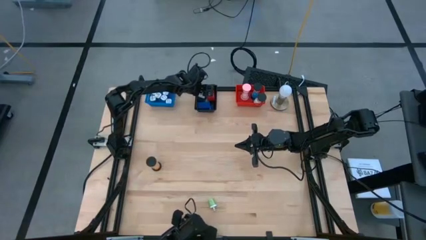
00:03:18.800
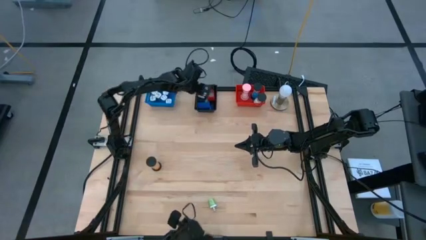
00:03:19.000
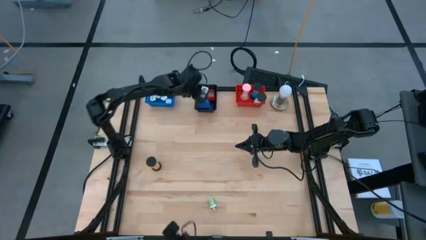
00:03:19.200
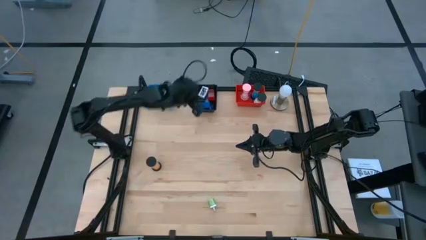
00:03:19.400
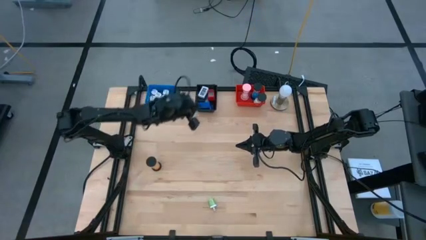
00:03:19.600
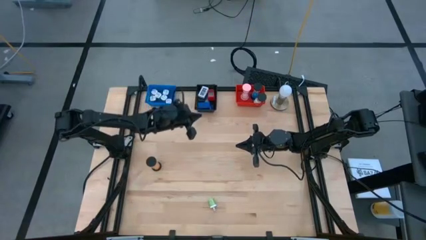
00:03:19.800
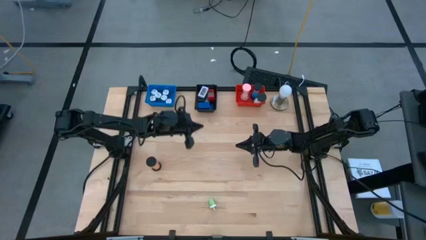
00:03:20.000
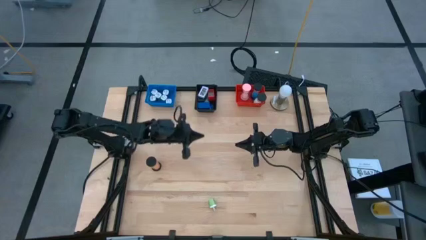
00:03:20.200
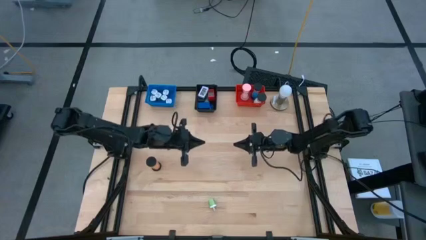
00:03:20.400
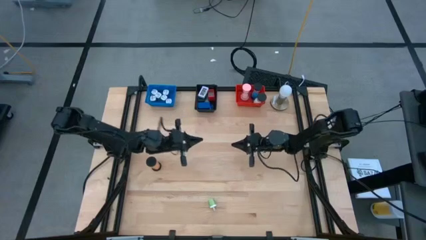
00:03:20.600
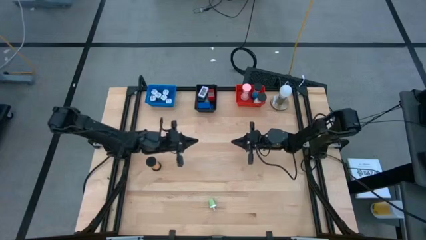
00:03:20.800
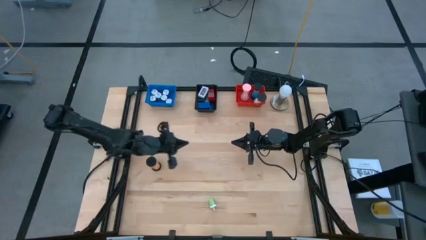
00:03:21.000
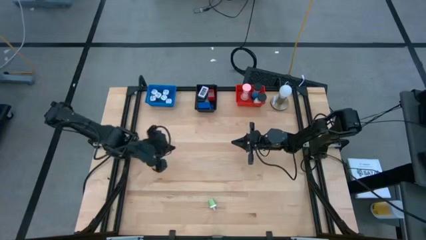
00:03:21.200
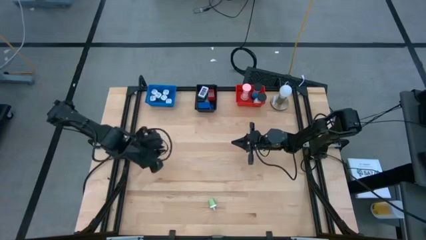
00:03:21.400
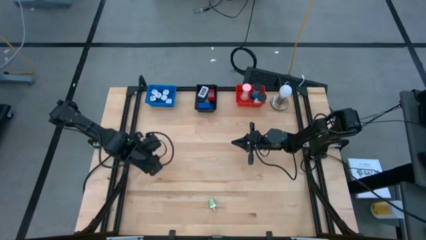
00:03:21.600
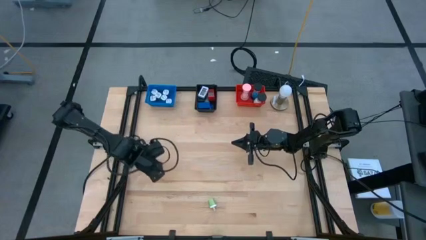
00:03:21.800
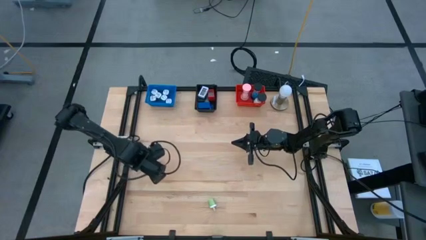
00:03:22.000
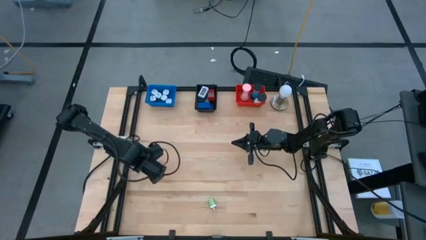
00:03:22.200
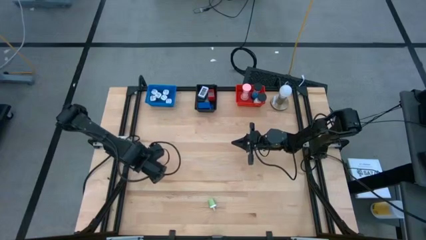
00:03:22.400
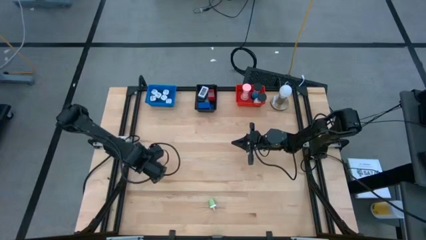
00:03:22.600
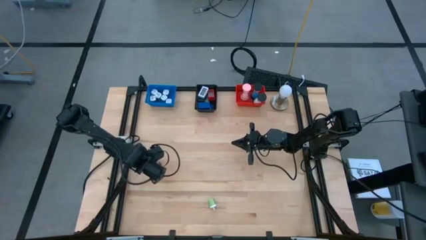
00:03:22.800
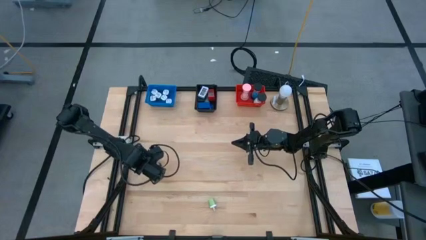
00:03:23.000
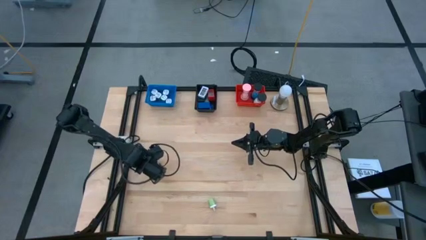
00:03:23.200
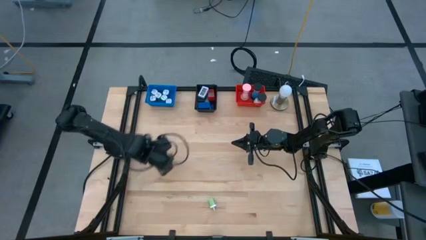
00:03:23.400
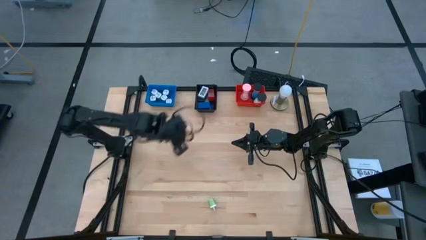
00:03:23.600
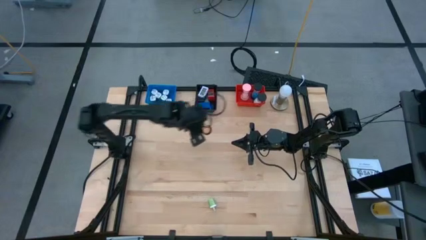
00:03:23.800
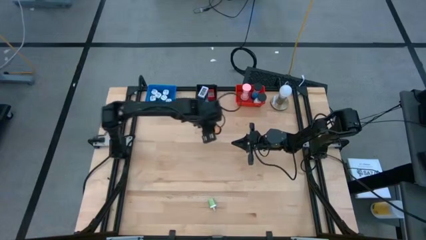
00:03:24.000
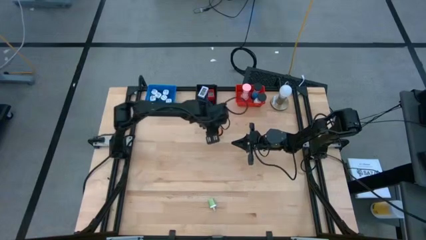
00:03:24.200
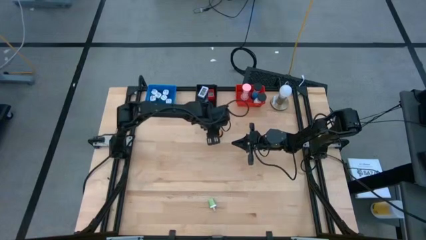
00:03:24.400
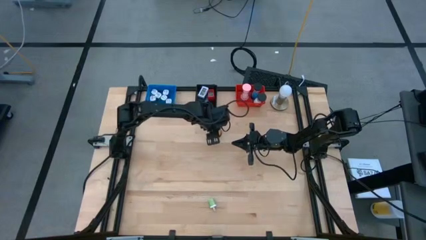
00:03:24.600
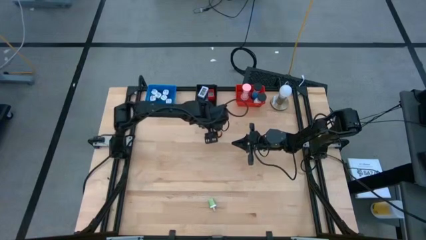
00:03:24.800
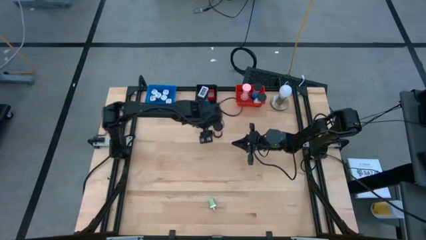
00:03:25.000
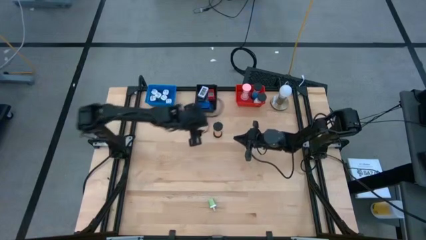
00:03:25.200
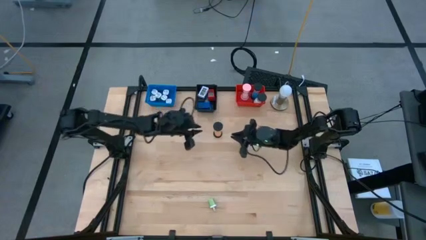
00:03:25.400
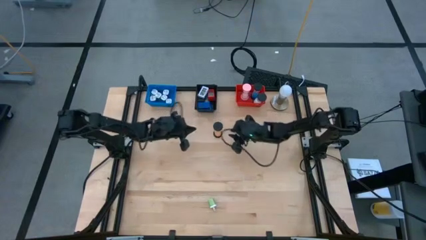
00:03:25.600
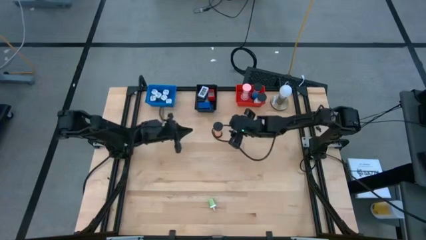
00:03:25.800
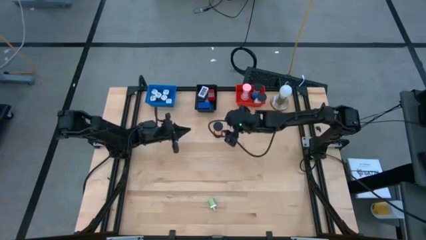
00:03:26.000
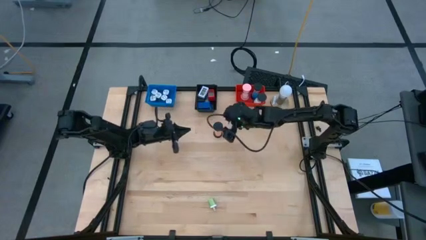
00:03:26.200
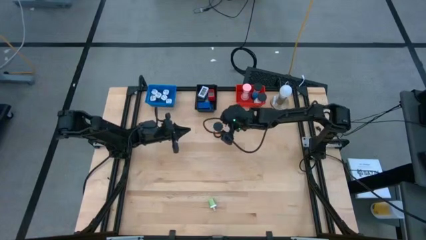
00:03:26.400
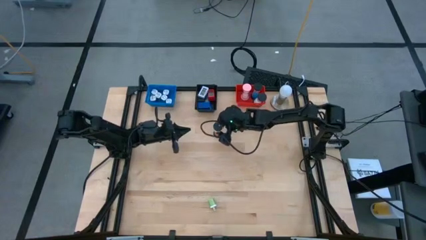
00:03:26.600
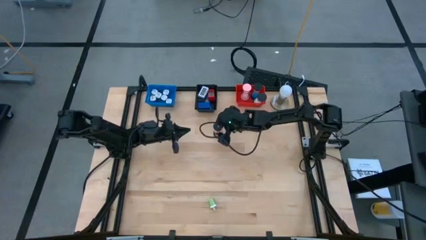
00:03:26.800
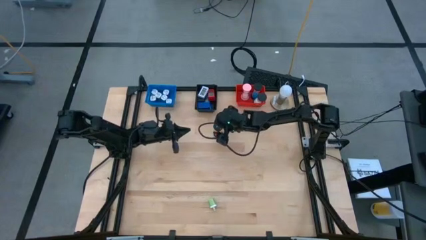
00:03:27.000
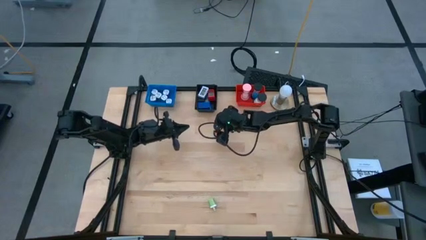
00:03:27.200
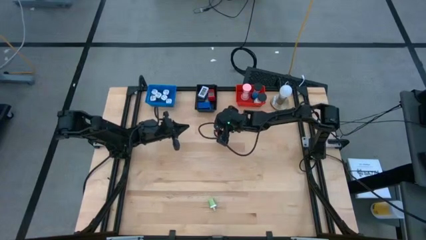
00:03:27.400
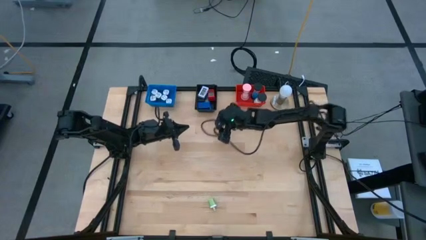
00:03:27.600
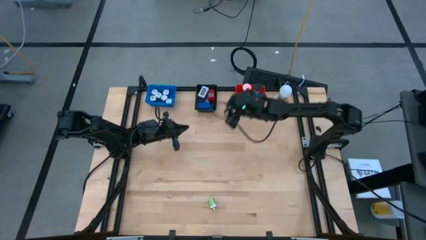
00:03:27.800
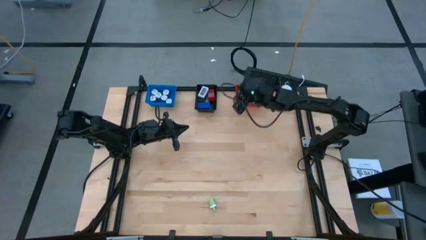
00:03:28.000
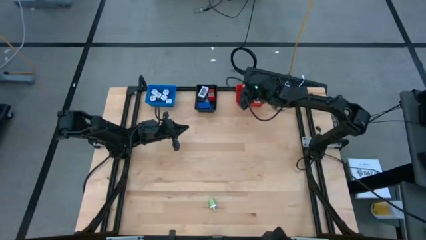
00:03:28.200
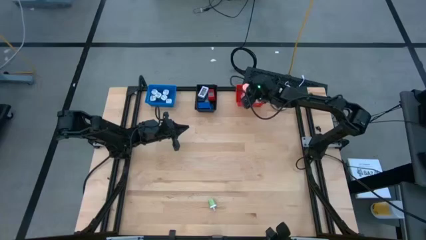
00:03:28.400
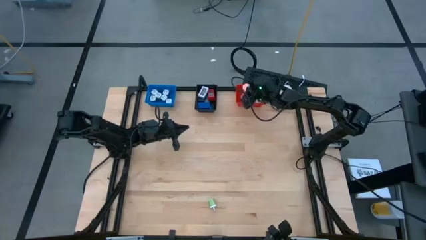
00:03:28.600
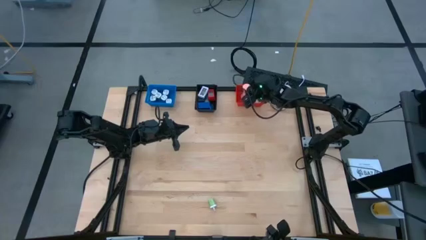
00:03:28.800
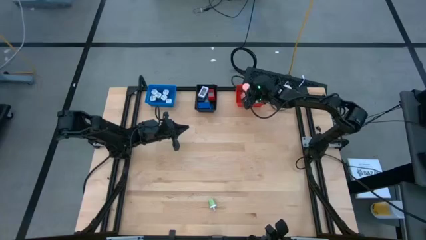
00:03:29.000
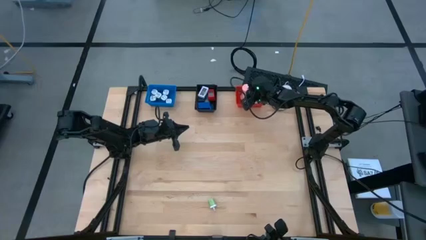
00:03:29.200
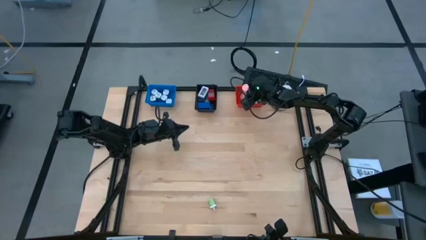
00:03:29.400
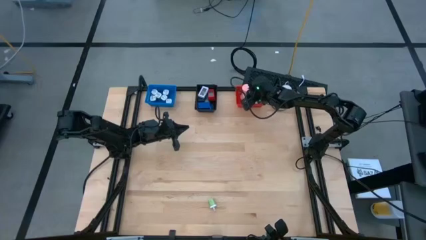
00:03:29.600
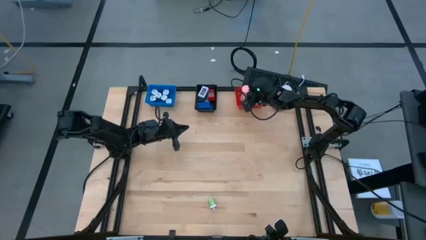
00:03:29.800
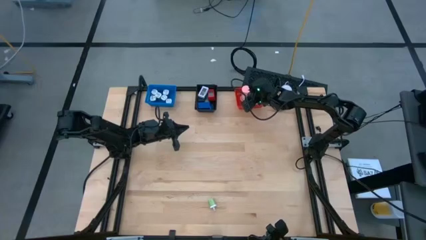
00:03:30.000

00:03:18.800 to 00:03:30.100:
Task: Pick & Place Office items
Put the black hourglass into the red bin

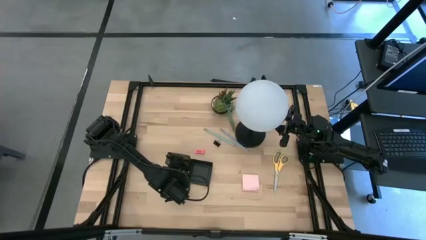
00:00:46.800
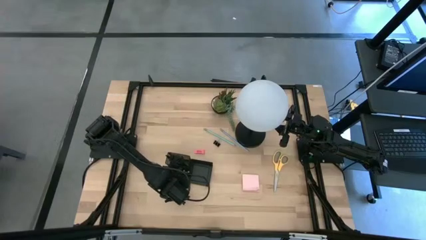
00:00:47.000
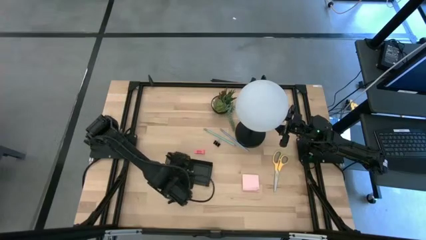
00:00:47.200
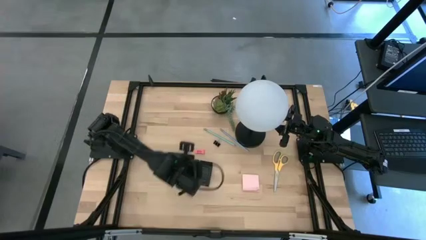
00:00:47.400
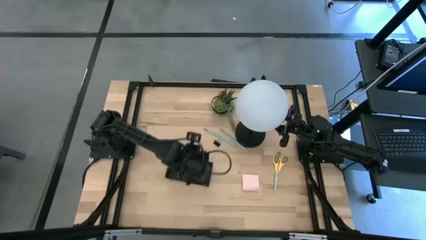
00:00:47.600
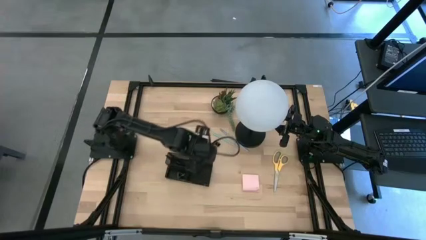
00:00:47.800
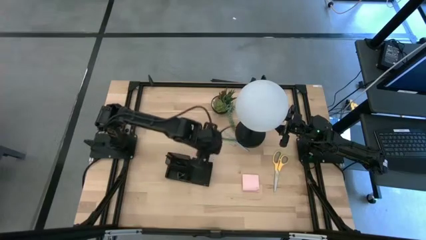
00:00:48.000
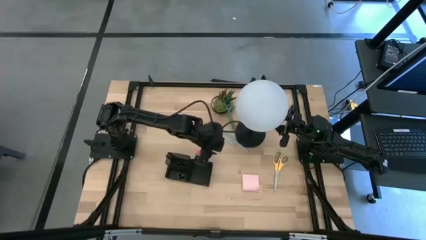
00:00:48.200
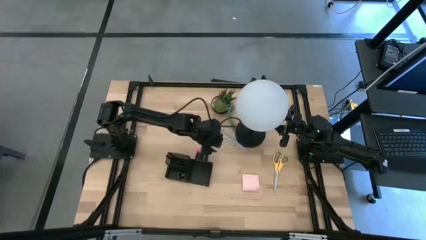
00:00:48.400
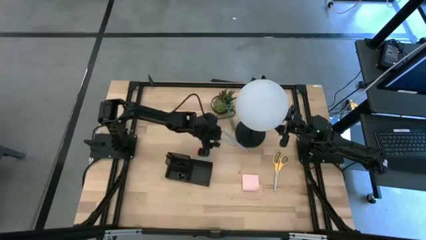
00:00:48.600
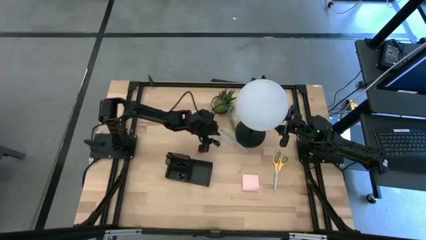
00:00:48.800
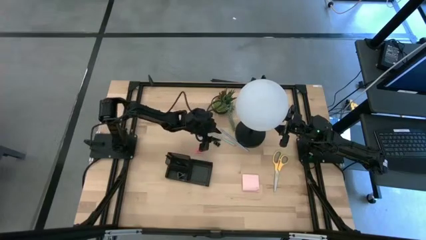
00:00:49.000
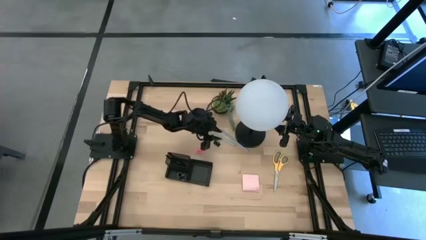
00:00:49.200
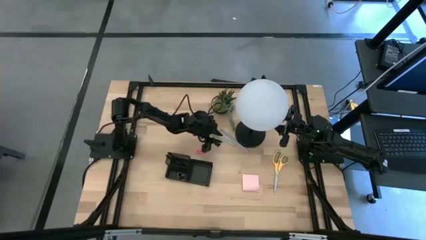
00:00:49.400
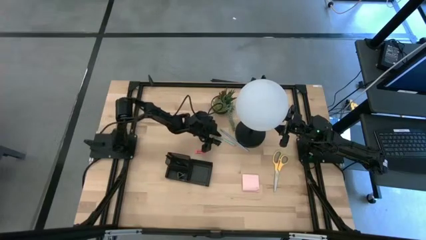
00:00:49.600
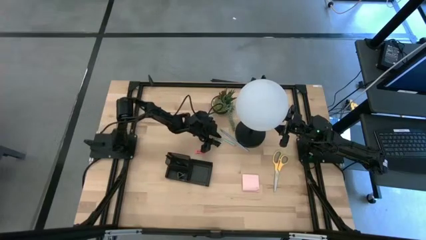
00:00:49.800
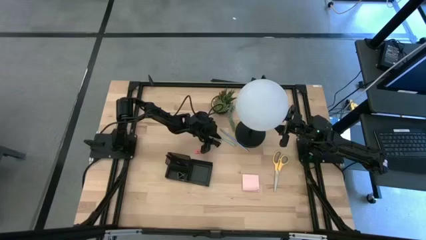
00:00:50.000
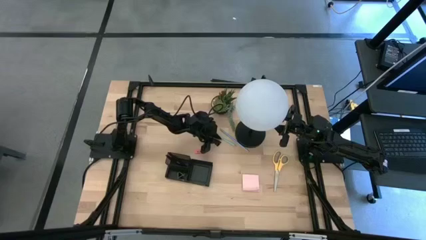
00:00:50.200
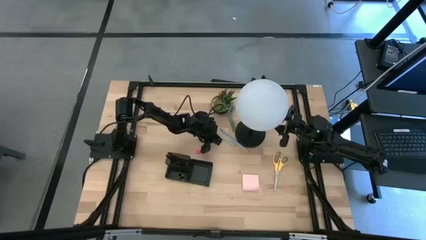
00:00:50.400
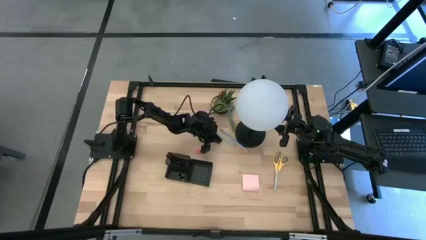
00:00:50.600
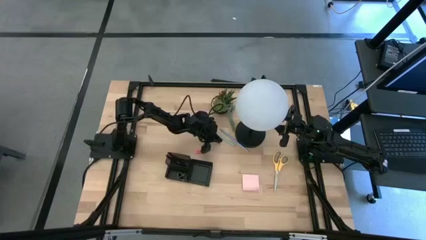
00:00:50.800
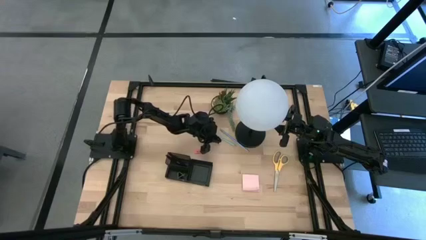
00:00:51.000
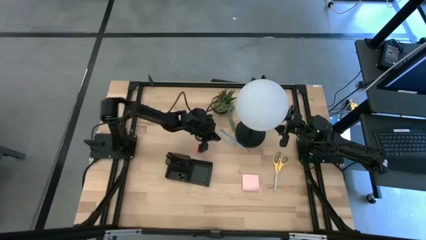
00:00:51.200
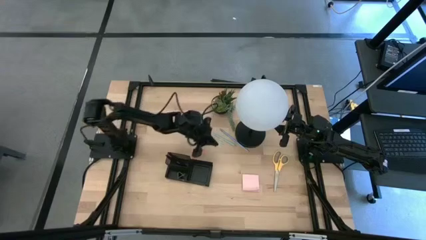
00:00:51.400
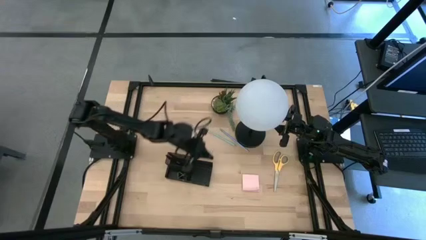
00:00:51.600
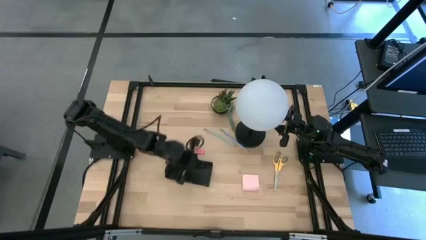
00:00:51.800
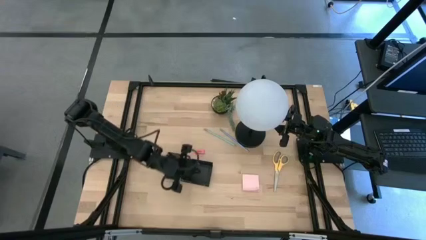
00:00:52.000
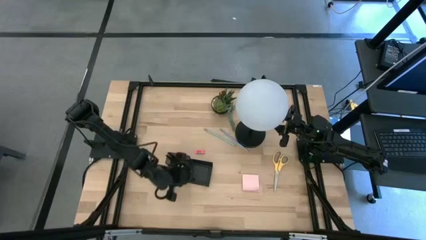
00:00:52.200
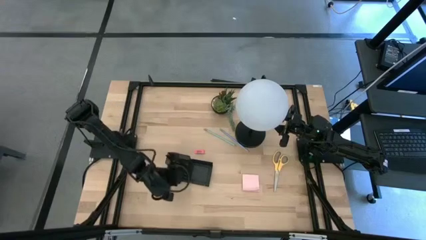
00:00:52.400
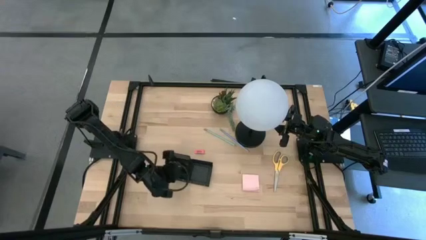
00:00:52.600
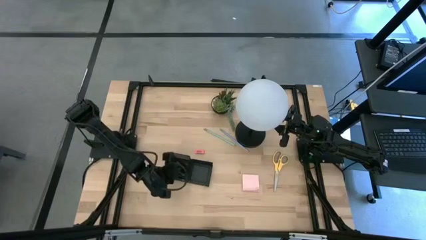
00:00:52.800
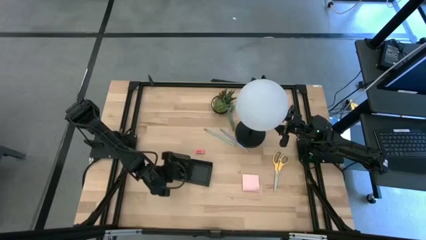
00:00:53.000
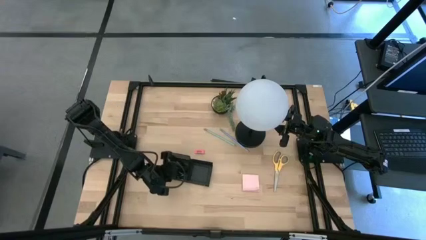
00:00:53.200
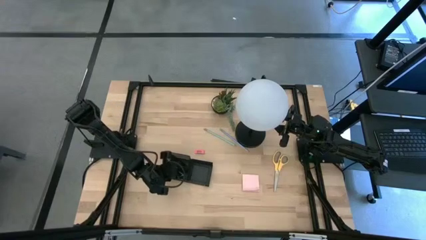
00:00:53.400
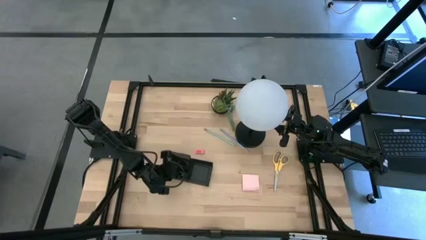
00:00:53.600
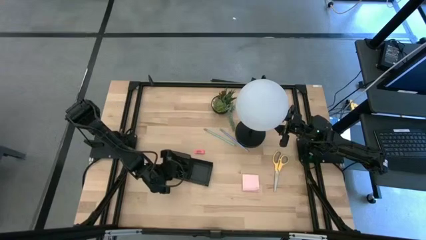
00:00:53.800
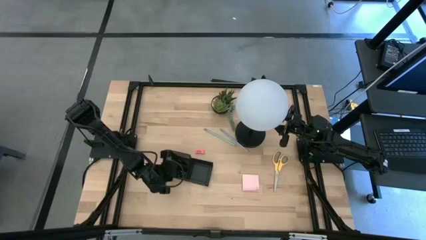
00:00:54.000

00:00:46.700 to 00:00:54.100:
Task: Pick and place office supplies into organizer
Put the black binder clip into the desk organizer
